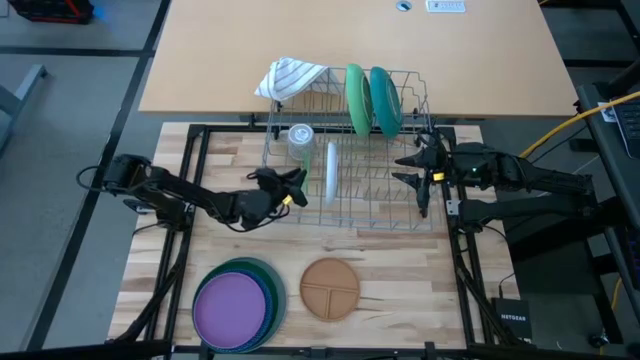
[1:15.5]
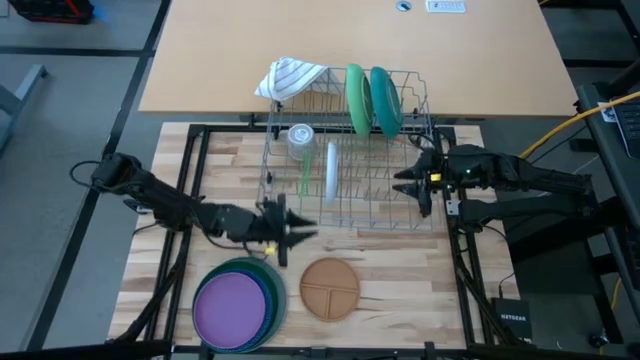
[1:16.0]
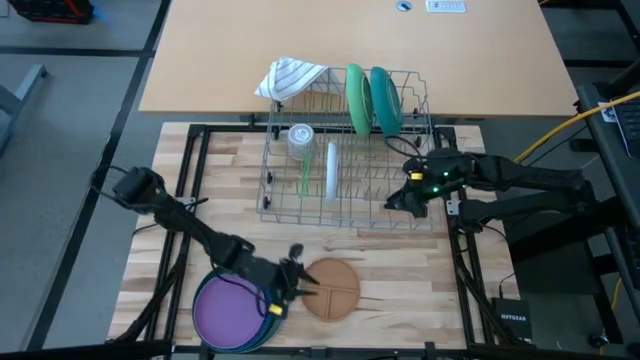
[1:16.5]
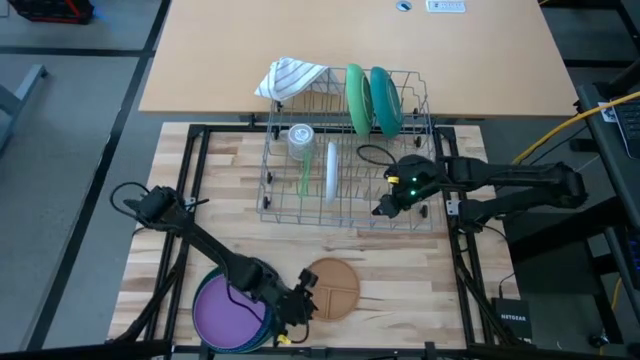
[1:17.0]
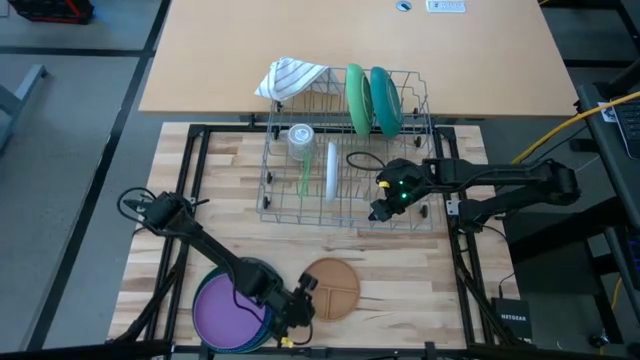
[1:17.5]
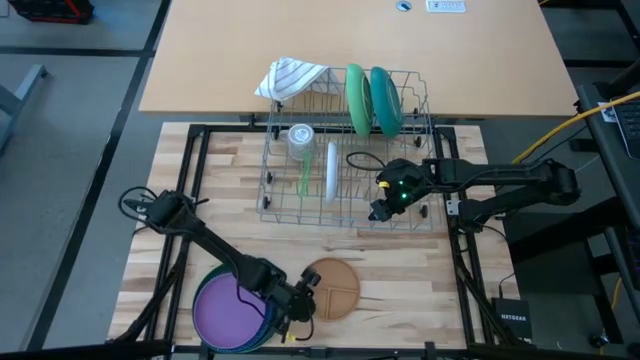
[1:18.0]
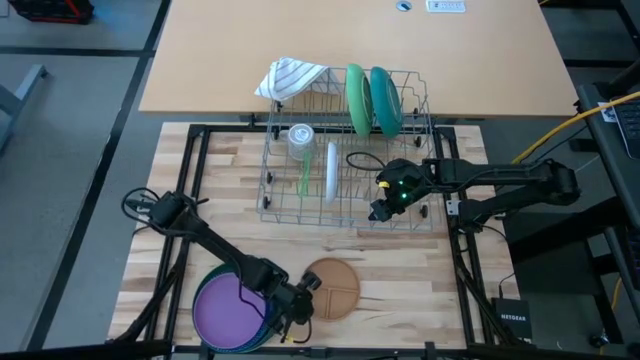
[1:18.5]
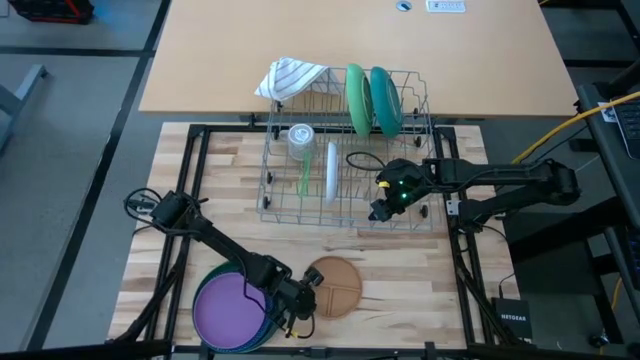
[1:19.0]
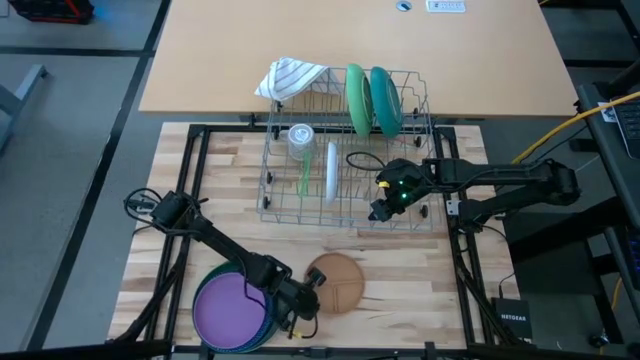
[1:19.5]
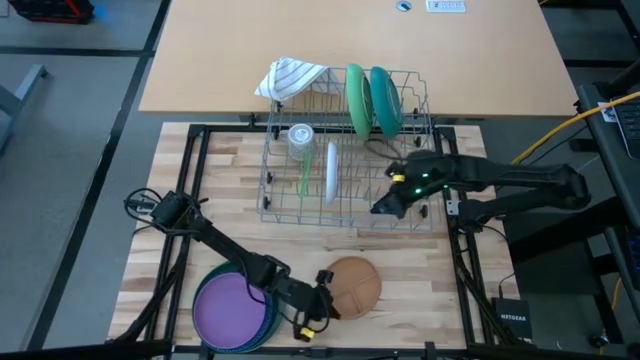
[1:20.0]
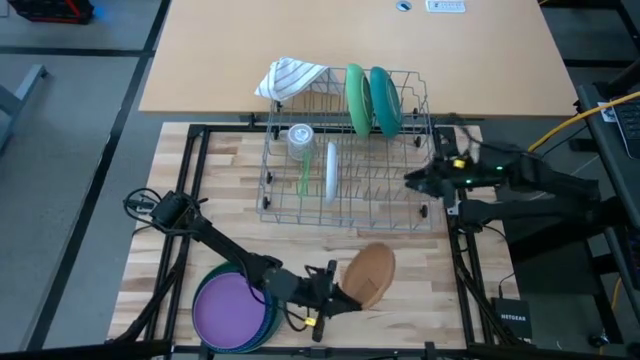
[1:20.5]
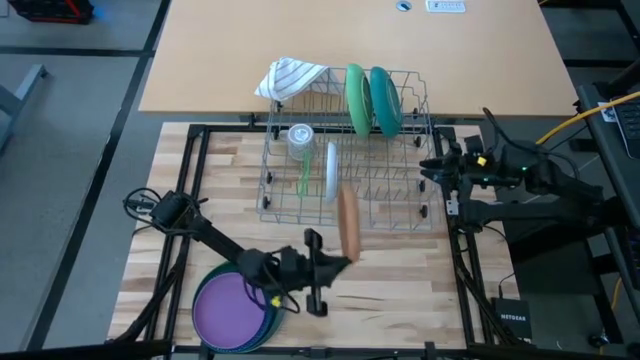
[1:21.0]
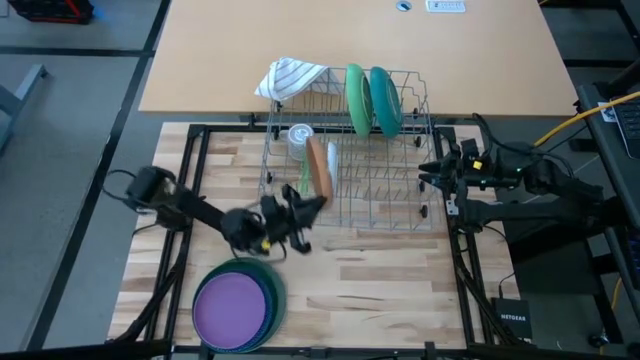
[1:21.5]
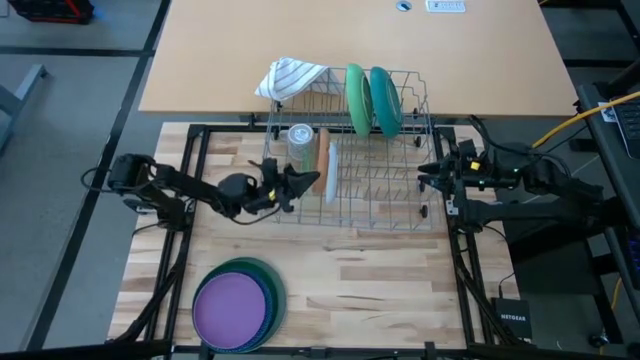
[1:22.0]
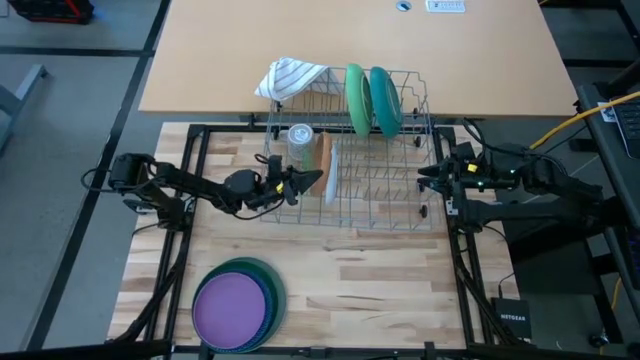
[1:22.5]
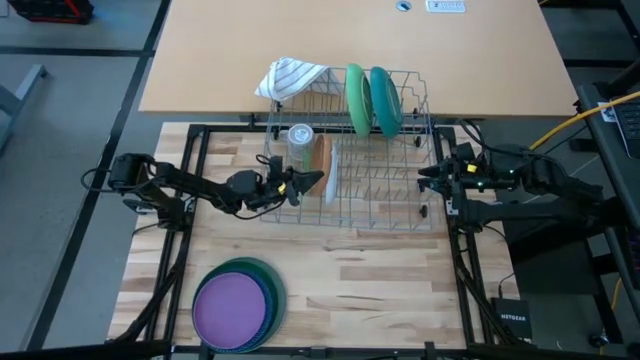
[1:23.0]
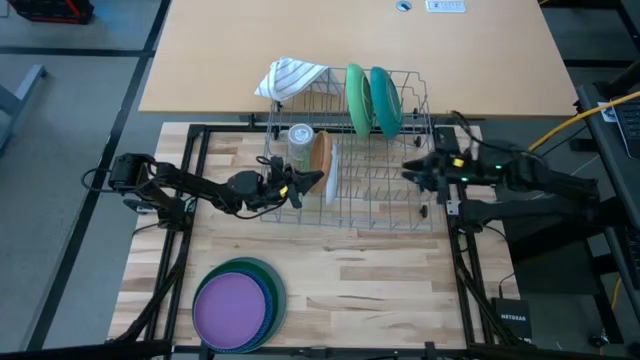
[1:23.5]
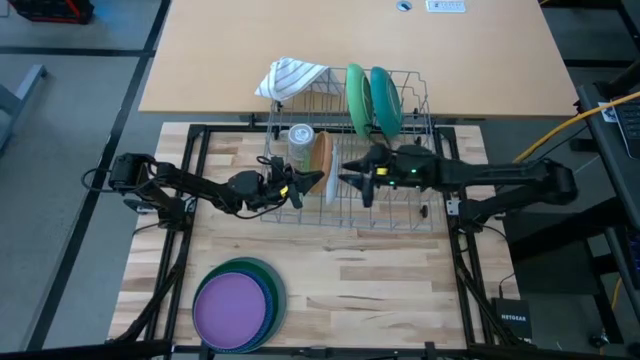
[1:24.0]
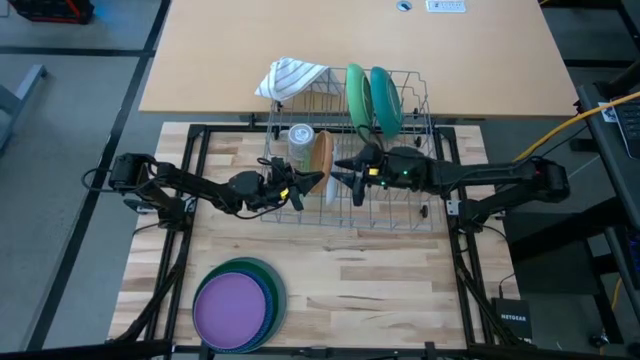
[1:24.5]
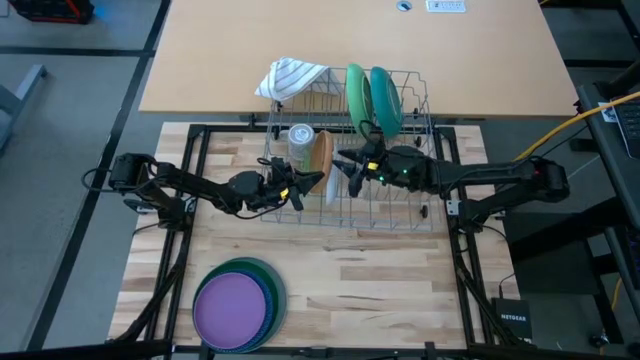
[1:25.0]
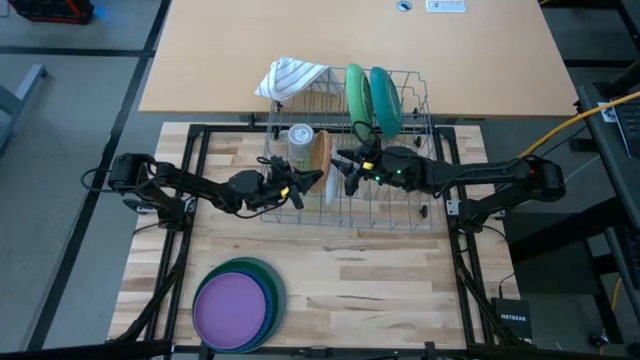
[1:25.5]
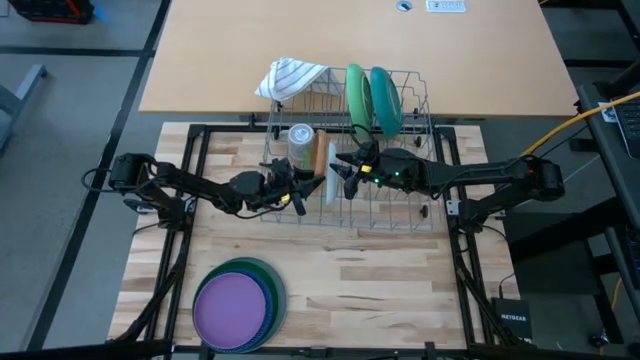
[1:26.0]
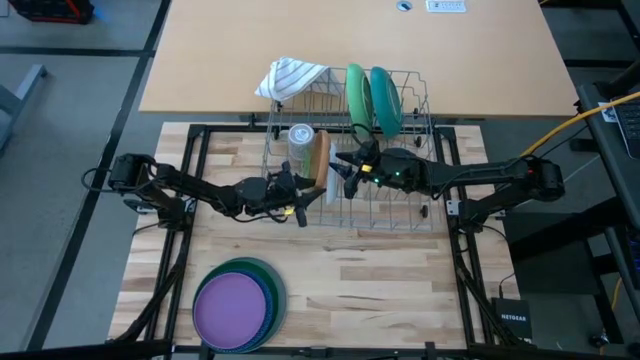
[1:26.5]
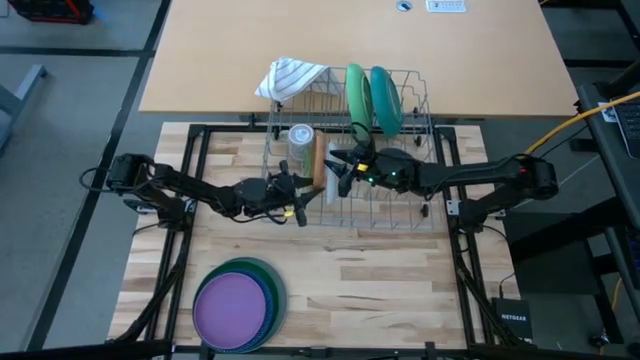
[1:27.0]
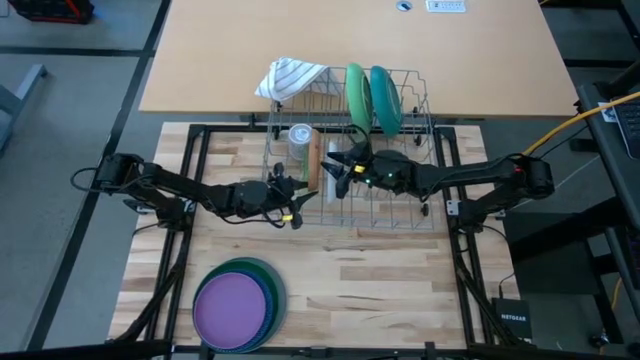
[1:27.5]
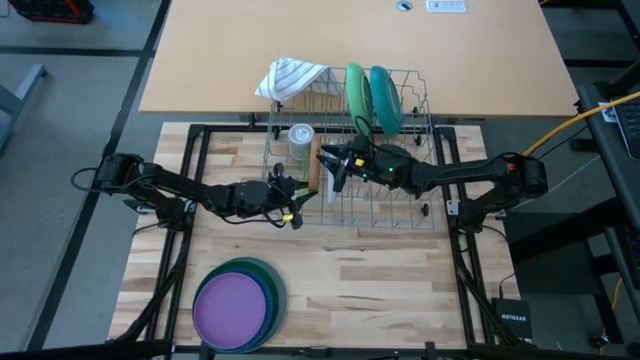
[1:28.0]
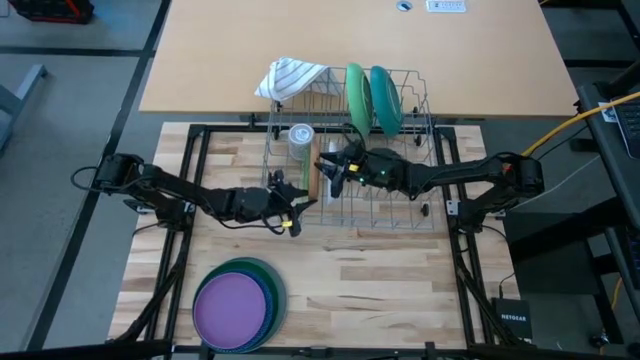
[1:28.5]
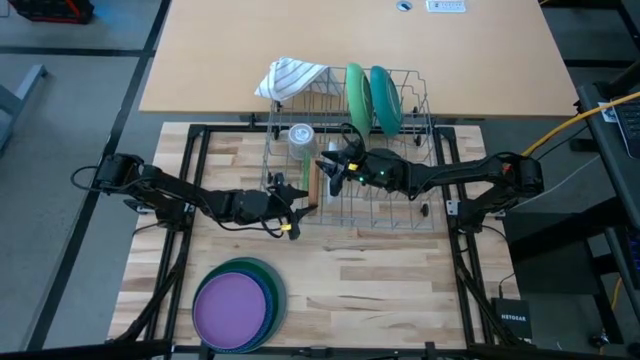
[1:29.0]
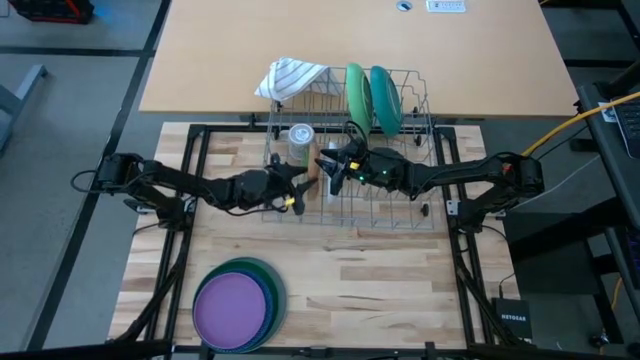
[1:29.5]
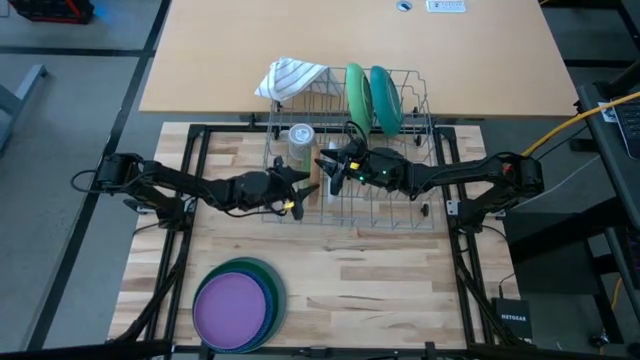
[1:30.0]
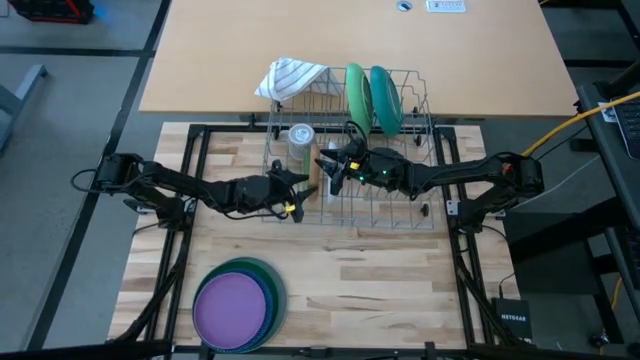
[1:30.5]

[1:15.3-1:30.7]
Task: Sort dishes
Put the brown plate in the dishwasher rack

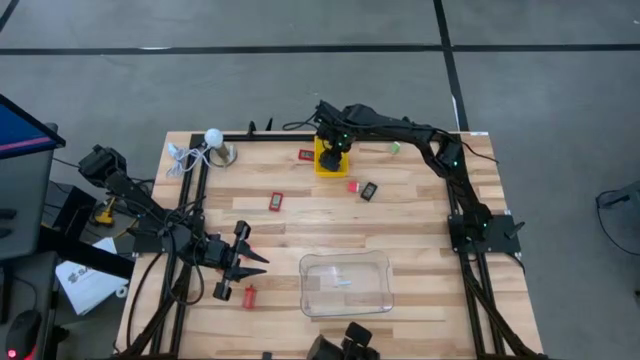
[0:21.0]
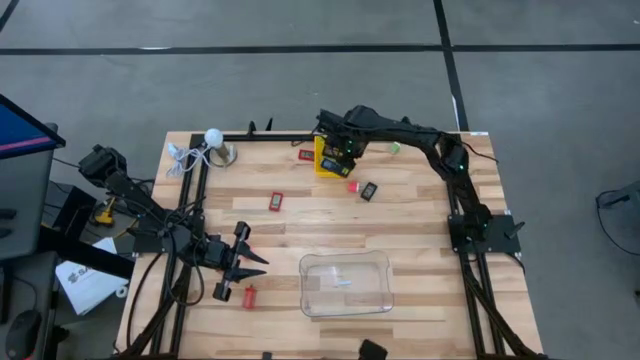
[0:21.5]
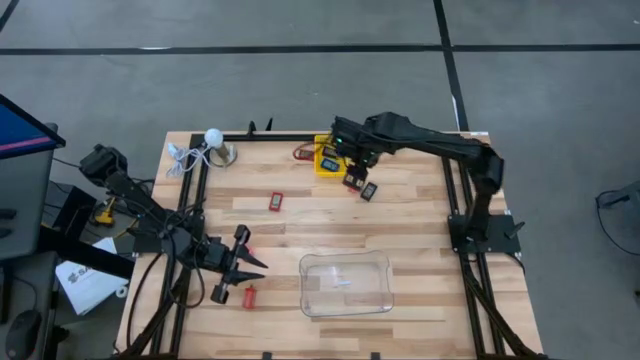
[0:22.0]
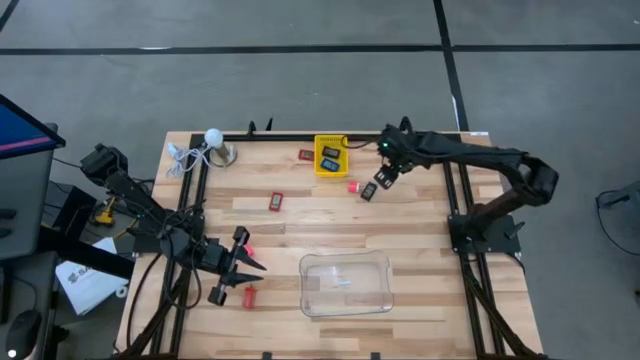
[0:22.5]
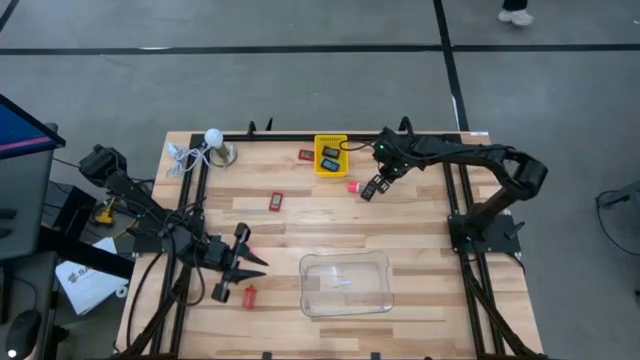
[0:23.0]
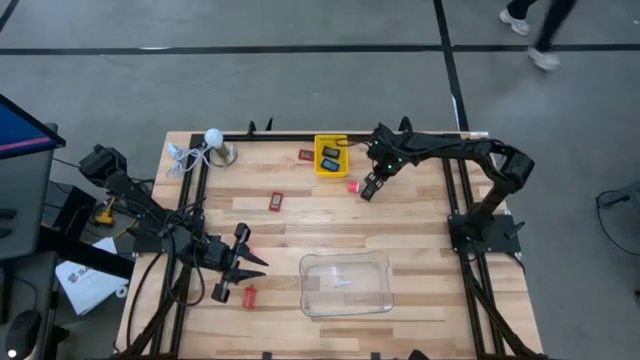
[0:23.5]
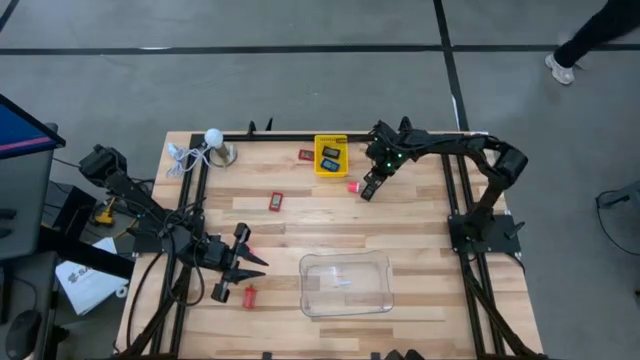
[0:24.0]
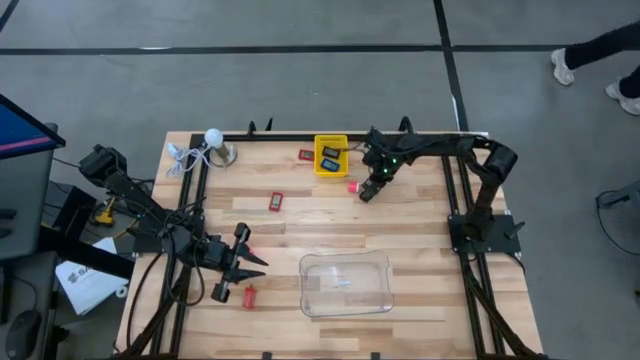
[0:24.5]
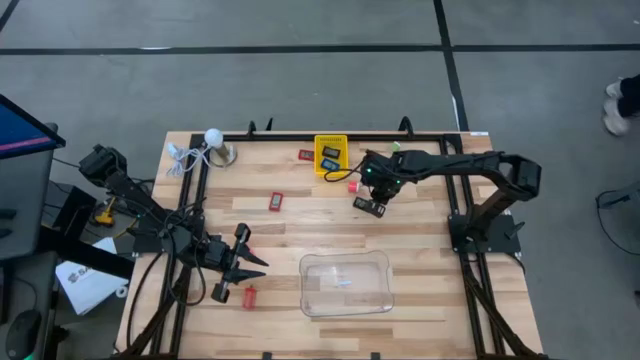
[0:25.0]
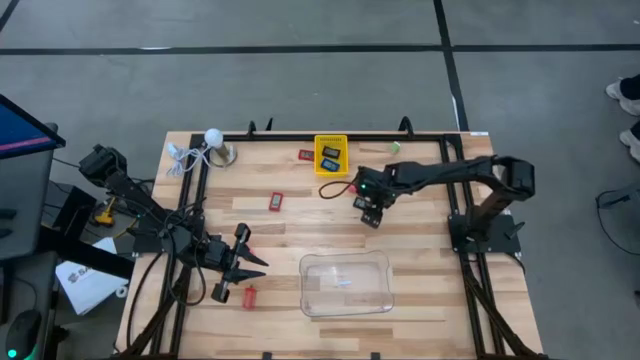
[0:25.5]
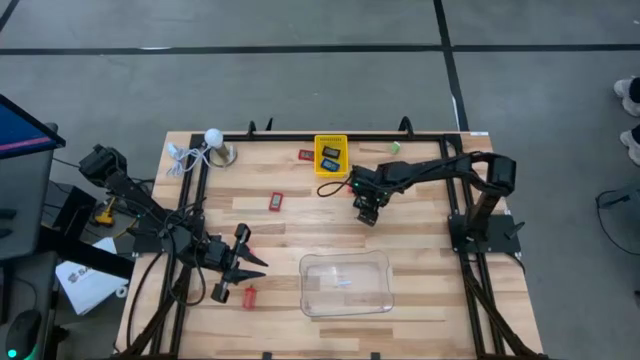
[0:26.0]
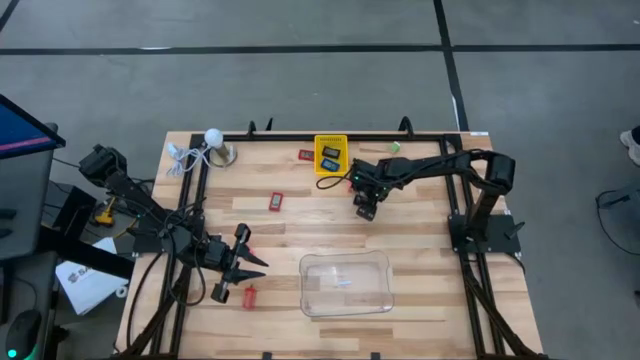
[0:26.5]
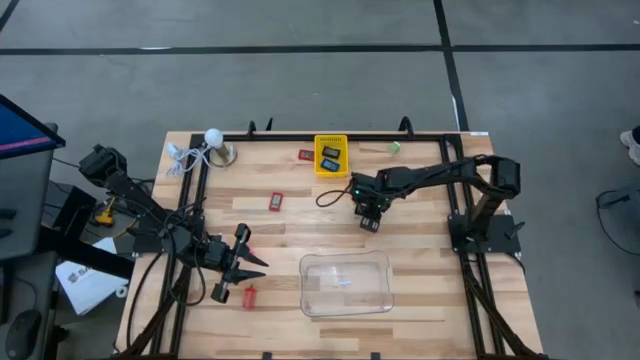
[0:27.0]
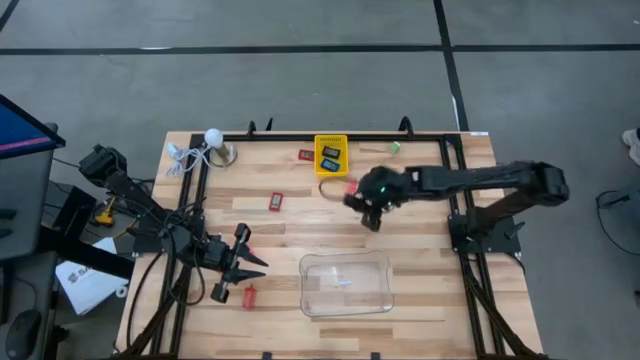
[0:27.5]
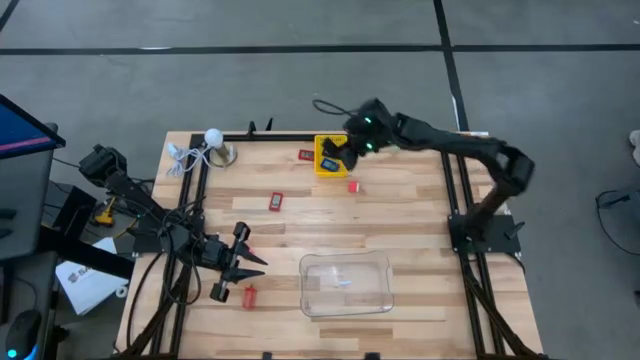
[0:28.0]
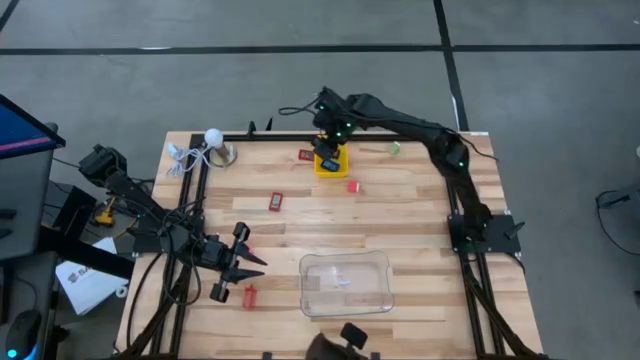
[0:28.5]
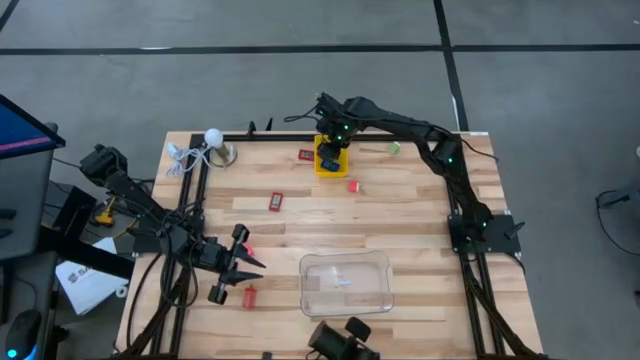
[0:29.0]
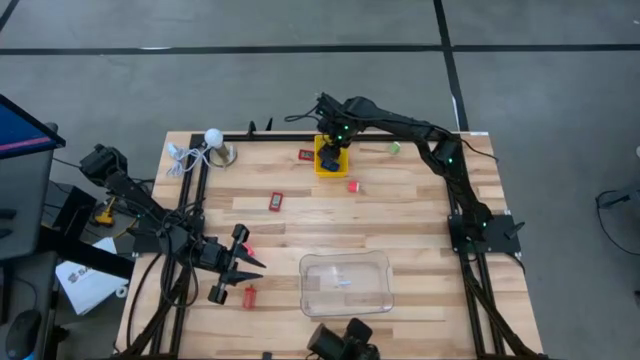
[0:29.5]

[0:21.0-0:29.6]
Task: Pick & Place Office items
Put the black digital clock into the yellow bin
